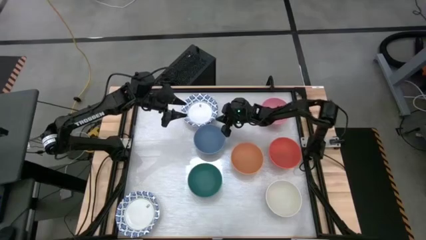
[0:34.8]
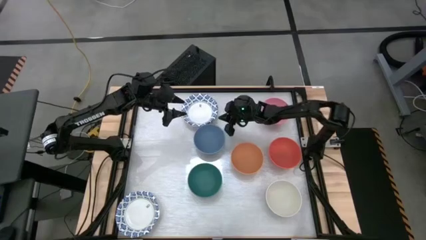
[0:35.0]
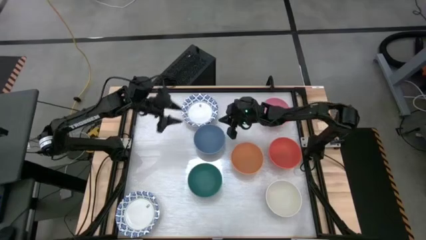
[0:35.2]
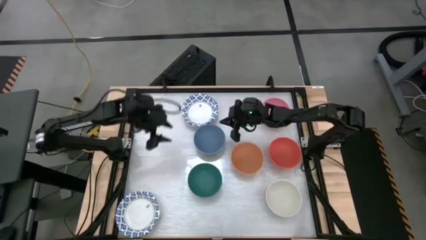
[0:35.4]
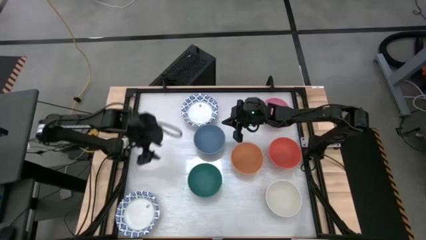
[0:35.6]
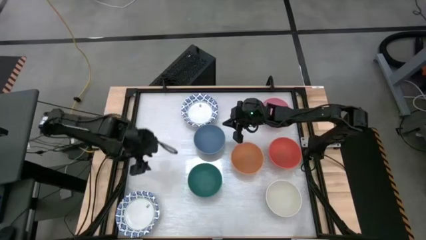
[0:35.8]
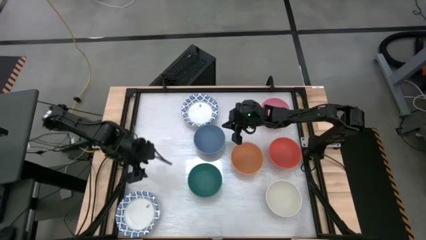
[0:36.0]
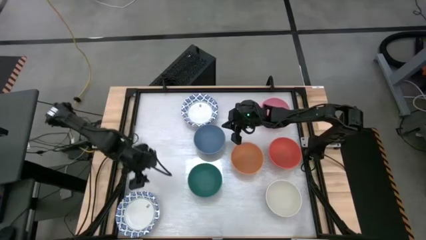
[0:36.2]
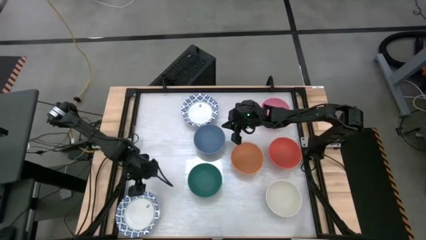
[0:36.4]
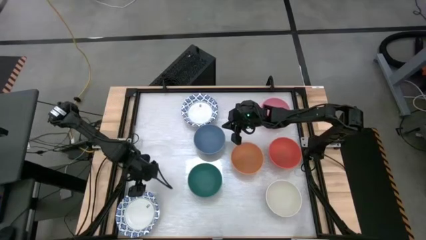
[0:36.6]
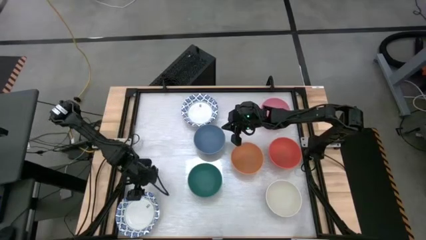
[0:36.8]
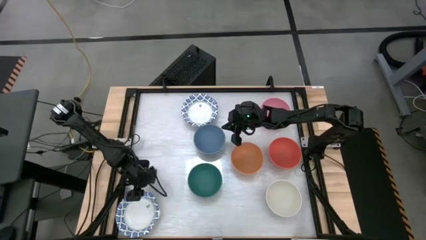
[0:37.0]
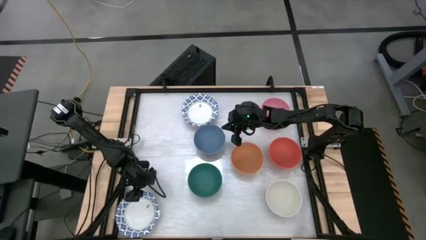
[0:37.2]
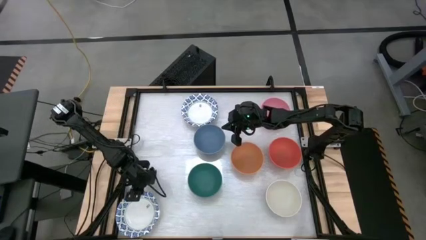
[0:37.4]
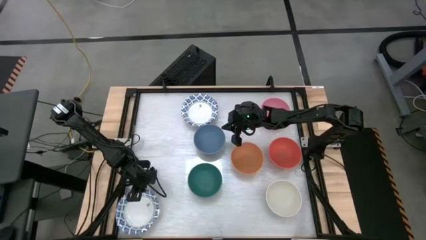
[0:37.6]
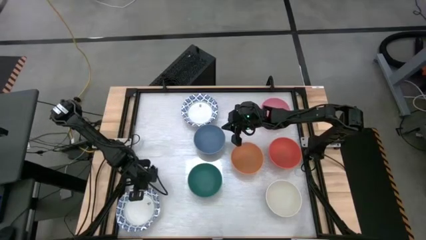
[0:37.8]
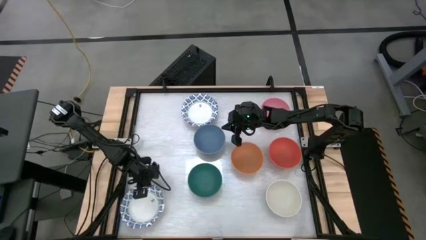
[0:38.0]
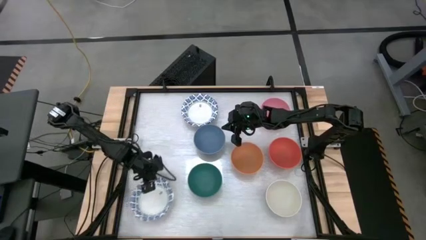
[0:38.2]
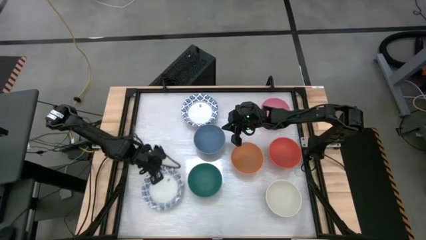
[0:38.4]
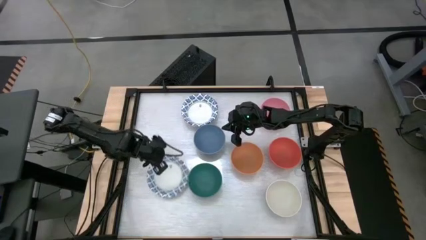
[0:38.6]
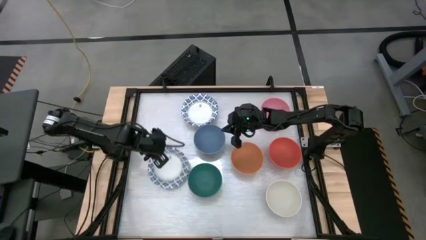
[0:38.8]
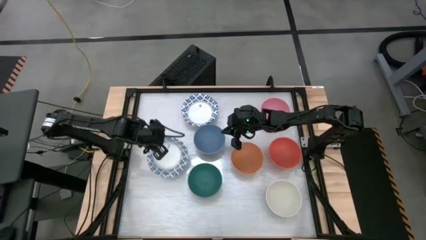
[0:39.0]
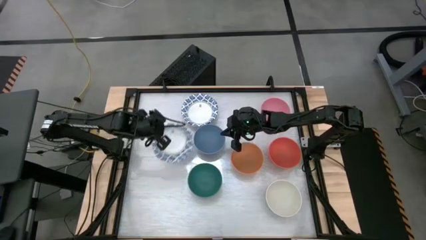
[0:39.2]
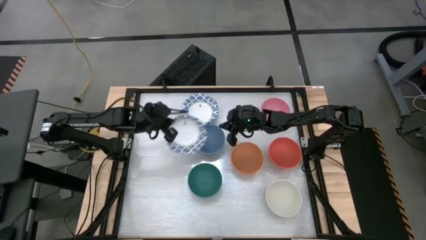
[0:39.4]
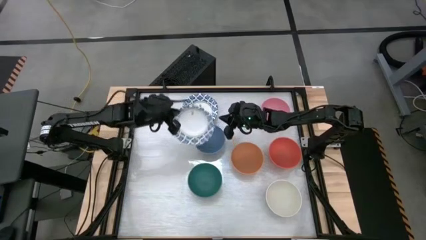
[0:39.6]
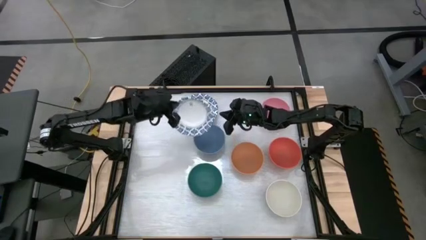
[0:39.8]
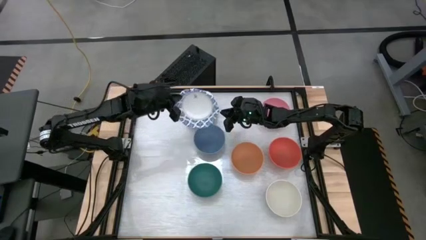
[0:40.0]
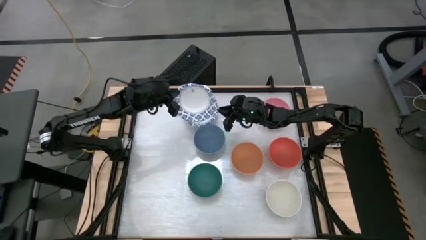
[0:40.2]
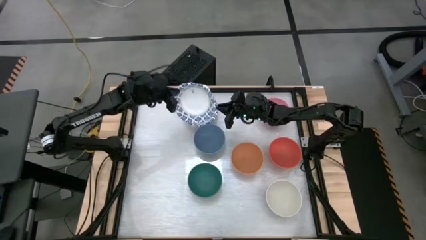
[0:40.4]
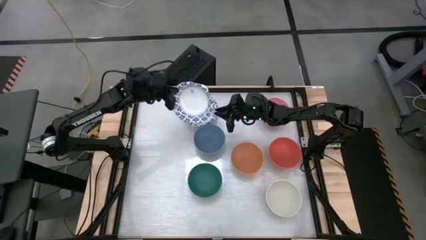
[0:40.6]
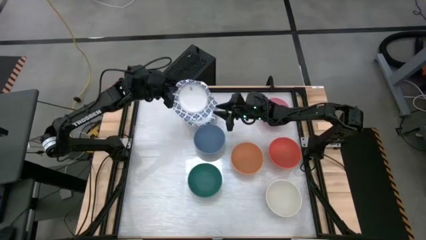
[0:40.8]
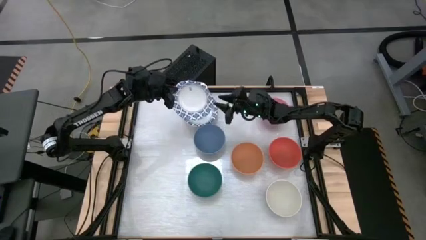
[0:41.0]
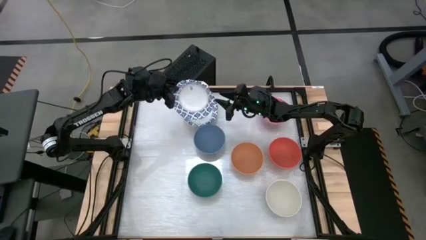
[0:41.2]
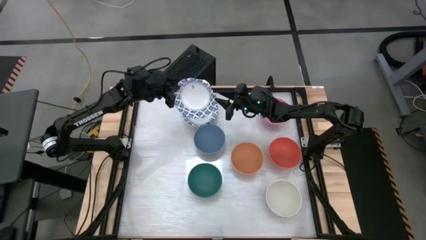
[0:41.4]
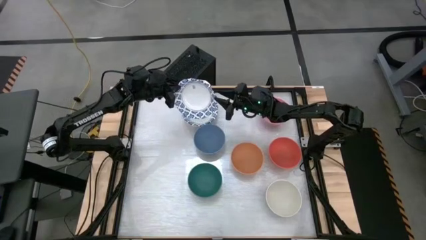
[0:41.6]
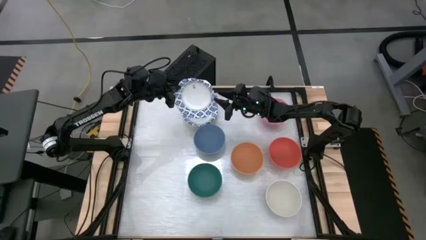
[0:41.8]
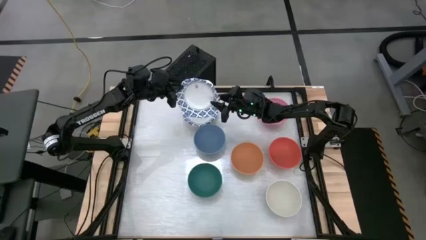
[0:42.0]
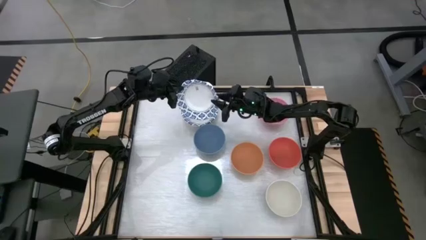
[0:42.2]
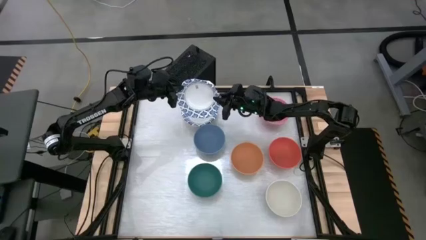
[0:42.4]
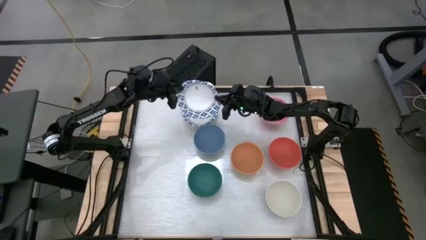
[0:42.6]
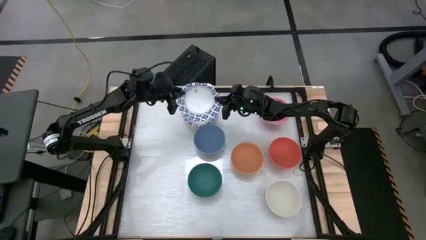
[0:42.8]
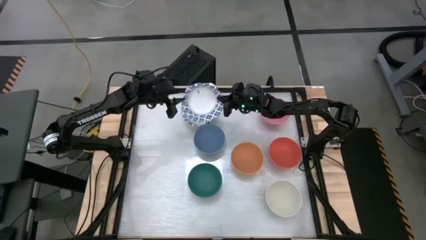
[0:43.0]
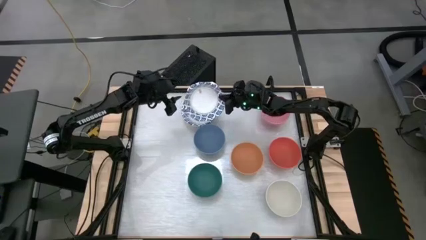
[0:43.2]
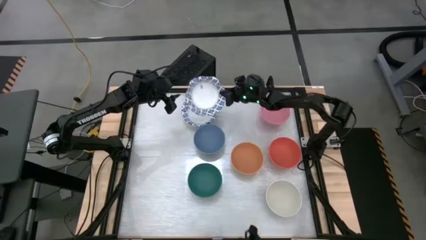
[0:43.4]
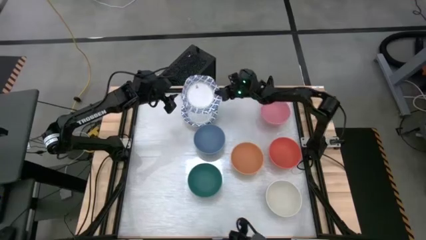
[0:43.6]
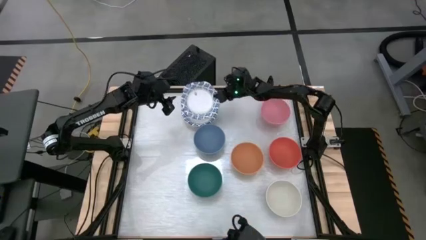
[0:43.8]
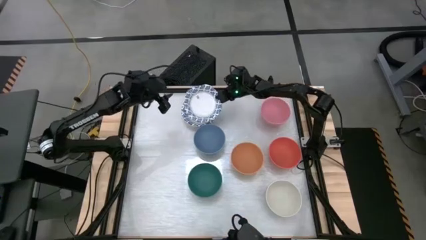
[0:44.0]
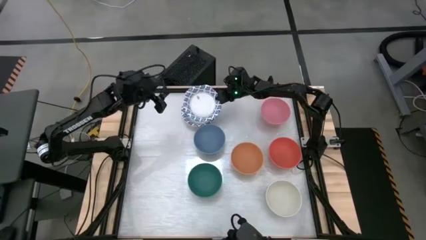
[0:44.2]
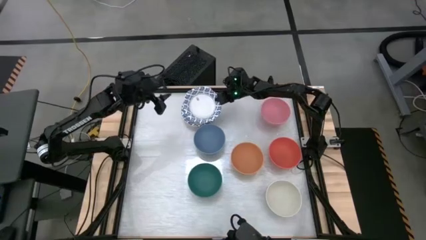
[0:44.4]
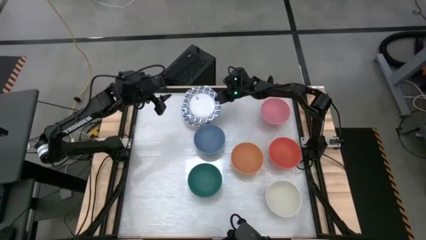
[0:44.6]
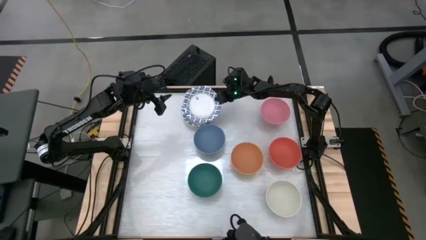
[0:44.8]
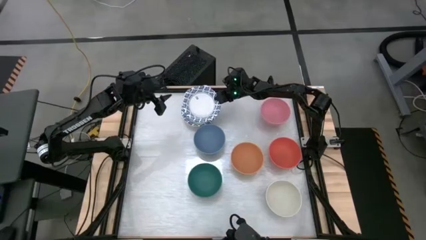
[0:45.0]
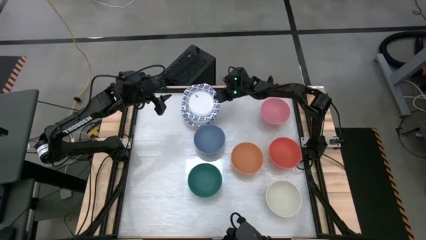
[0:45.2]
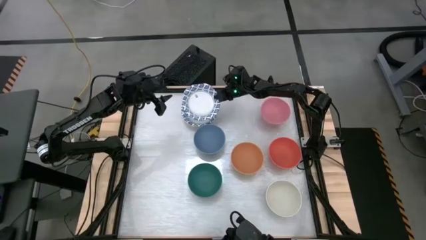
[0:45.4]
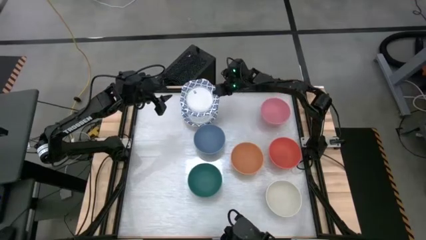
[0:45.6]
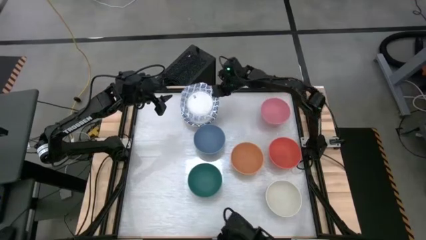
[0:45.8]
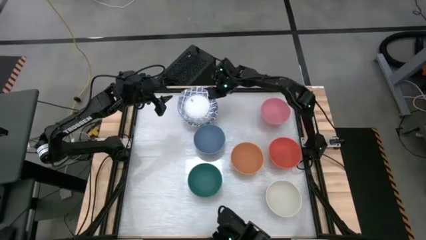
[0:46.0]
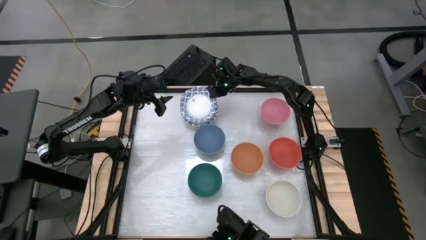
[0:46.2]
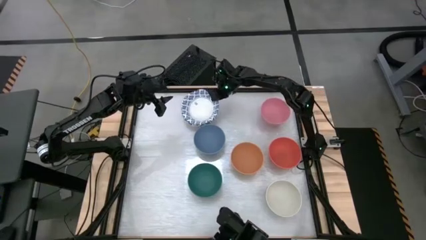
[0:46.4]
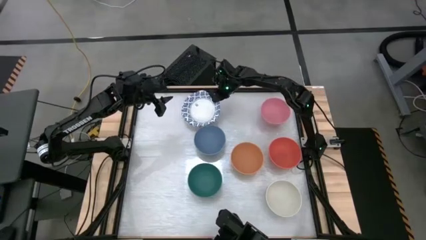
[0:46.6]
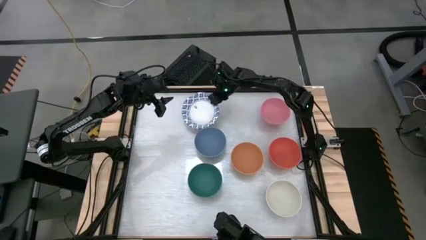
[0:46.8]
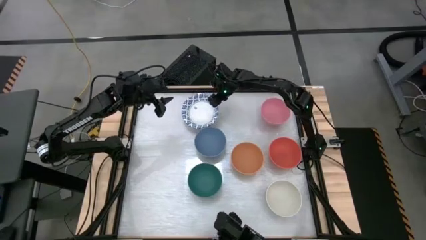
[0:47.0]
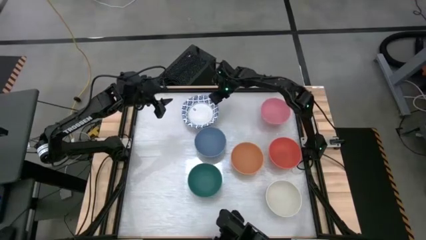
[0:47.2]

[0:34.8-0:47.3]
Stack the white bowl on top of the other white bowl

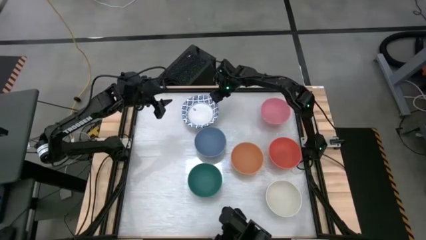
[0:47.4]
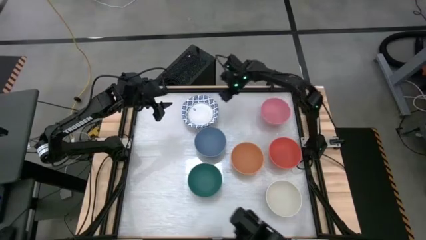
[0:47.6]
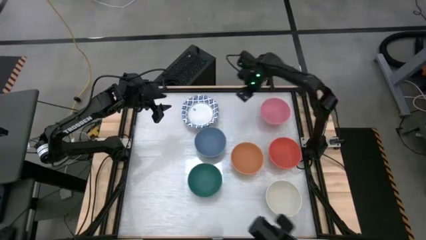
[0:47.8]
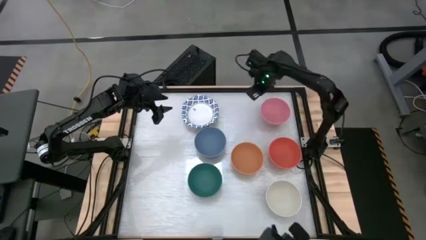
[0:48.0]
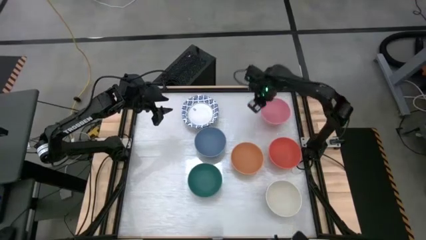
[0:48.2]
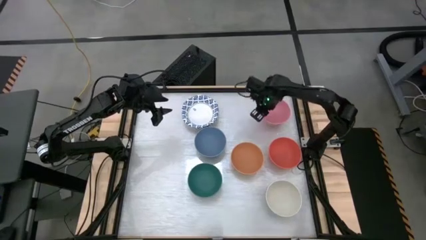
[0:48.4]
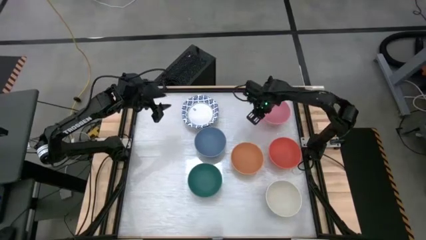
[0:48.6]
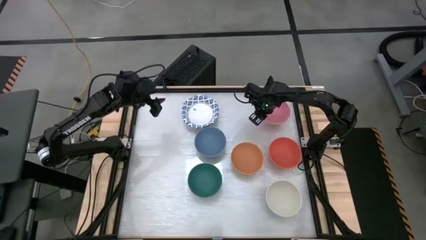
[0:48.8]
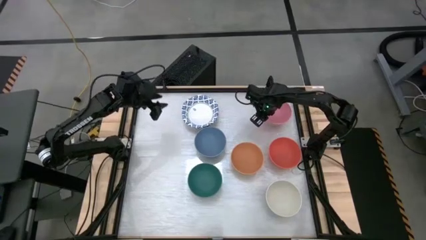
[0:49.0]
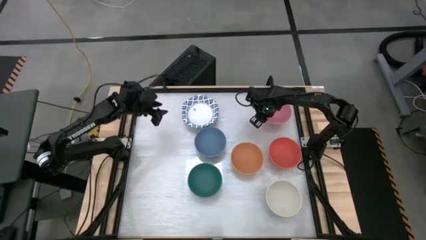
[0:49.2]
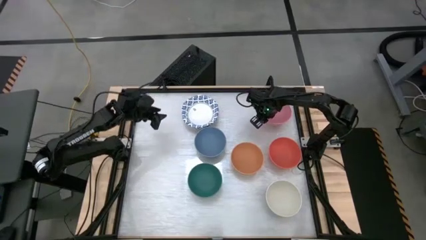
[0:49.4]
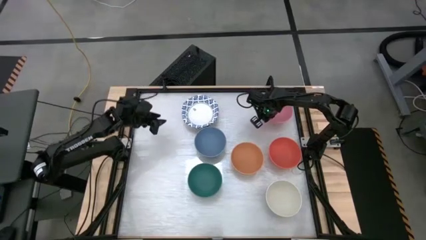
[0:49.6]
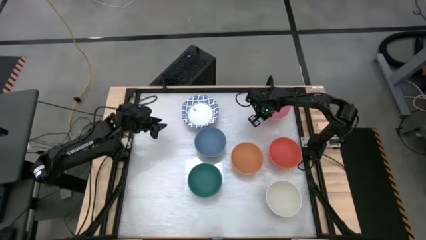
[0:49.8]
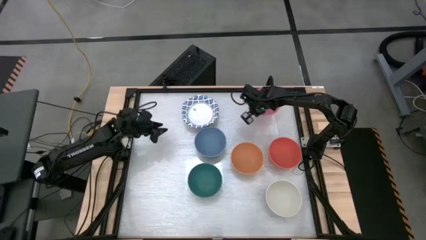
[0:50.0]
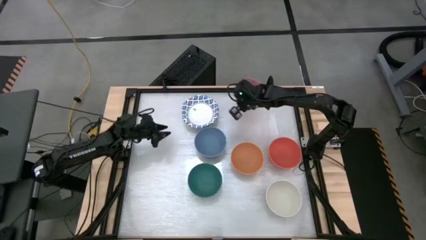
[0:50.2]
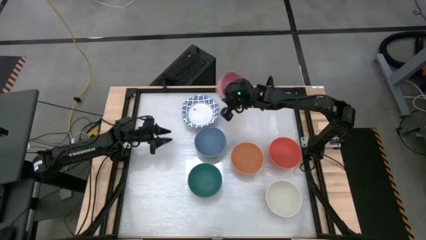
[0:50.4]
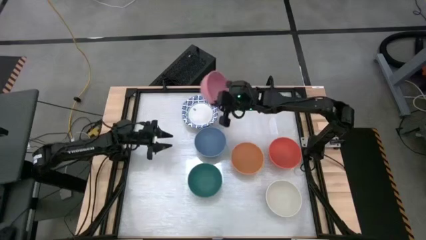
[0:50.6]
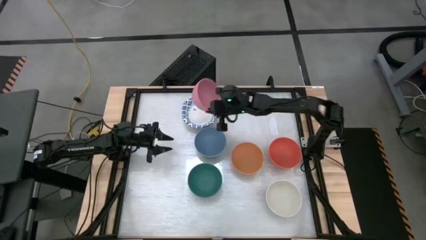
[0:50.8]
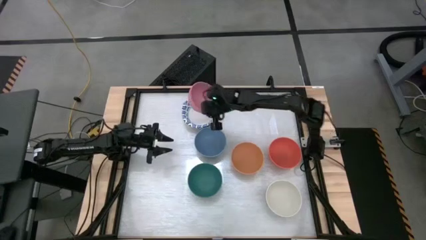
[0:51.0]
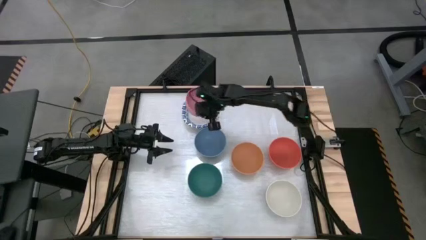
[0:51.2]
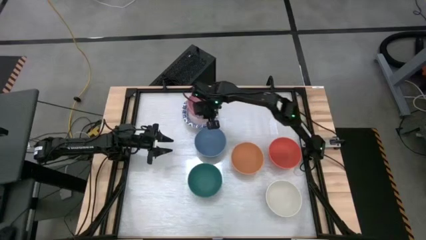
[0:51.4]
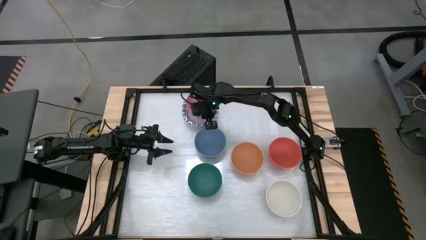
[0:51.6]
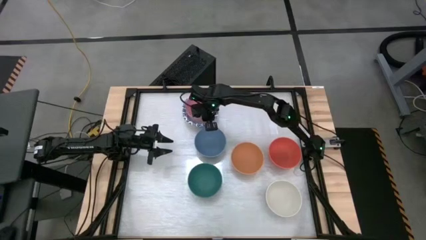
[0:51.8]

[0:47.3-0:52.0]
Stack the pink bowl on top of the white bowl
